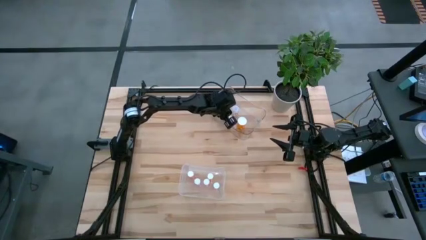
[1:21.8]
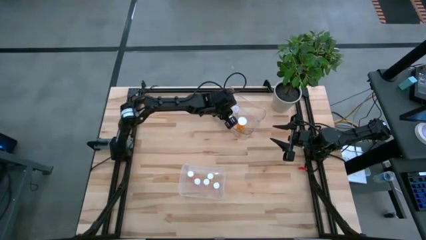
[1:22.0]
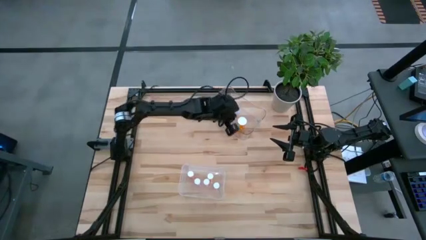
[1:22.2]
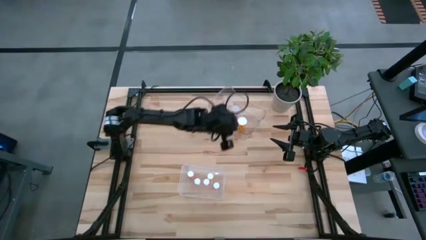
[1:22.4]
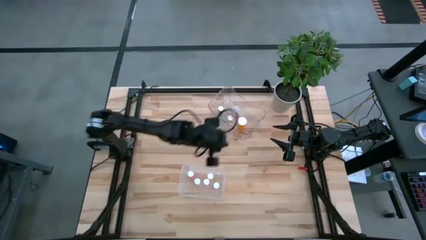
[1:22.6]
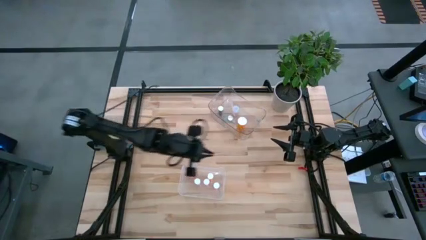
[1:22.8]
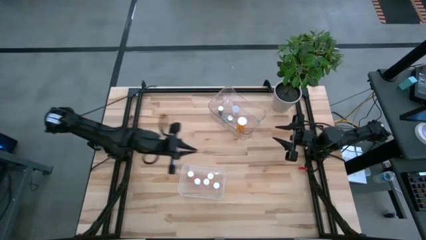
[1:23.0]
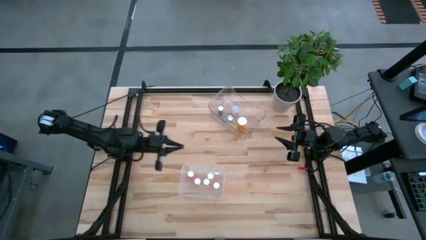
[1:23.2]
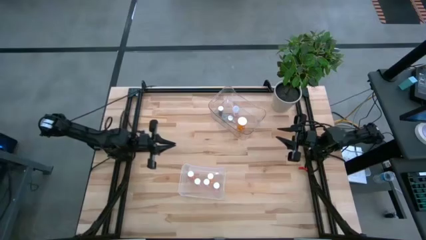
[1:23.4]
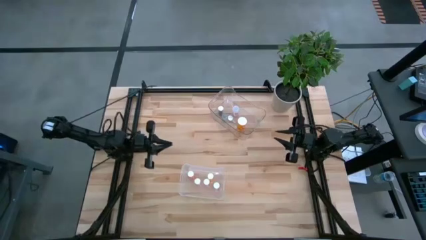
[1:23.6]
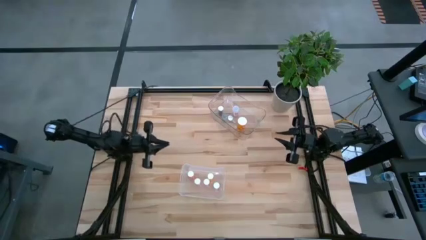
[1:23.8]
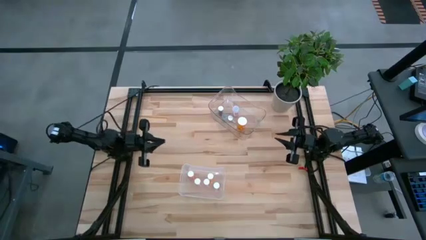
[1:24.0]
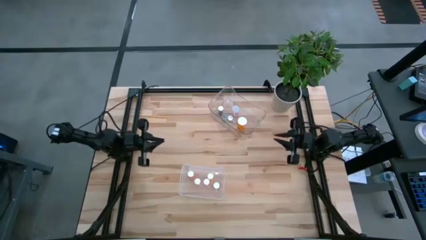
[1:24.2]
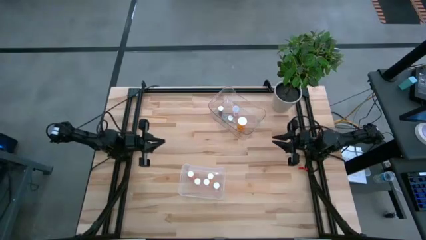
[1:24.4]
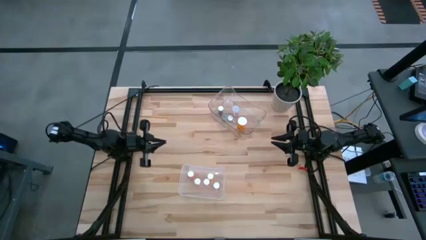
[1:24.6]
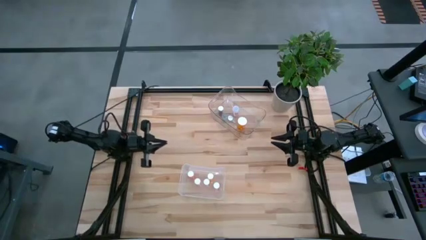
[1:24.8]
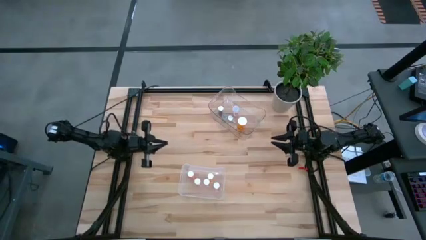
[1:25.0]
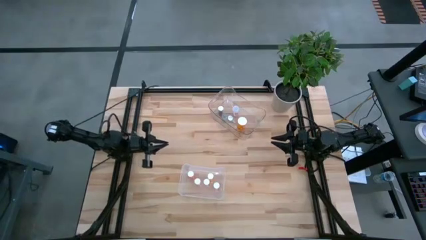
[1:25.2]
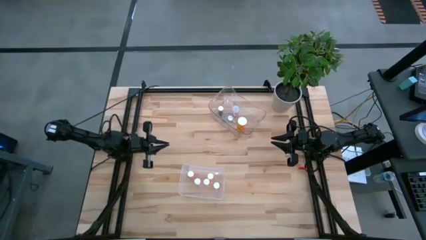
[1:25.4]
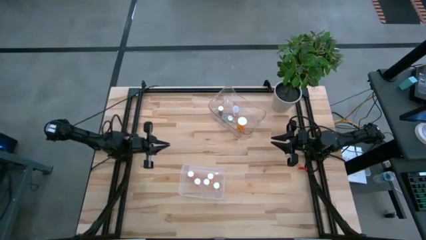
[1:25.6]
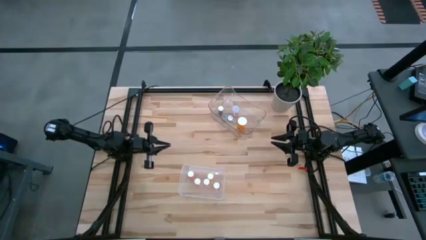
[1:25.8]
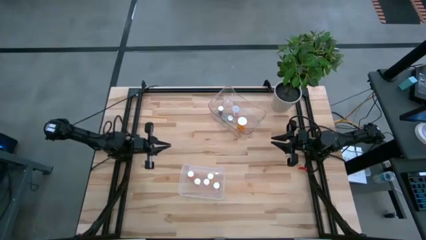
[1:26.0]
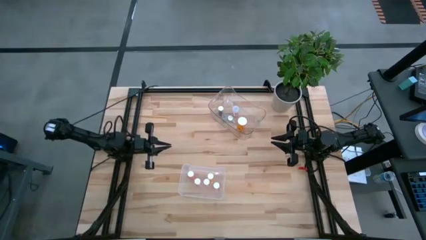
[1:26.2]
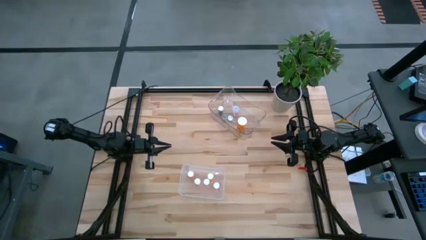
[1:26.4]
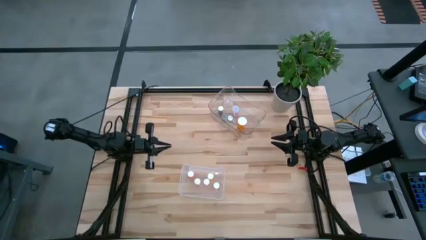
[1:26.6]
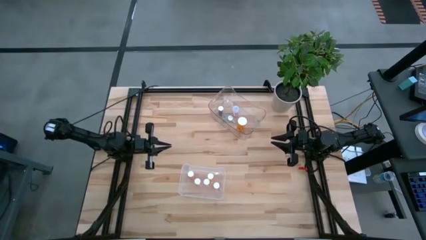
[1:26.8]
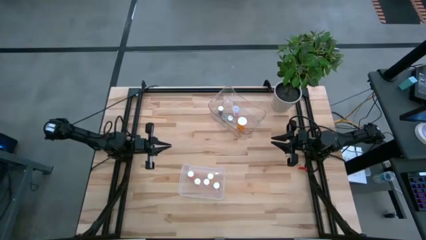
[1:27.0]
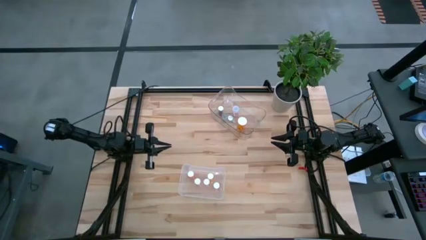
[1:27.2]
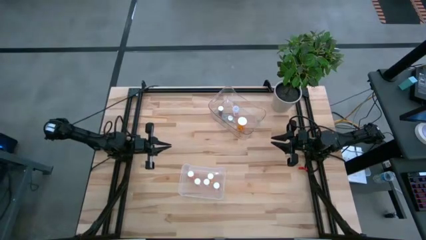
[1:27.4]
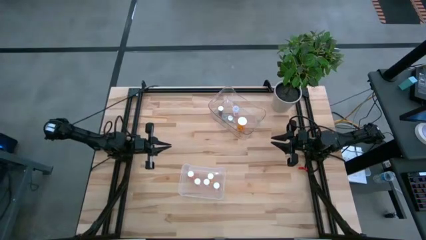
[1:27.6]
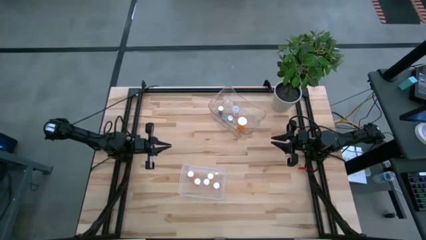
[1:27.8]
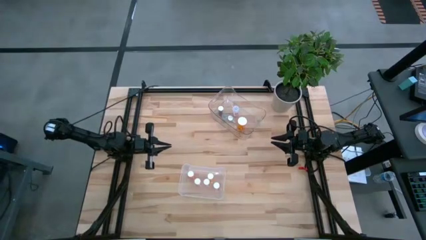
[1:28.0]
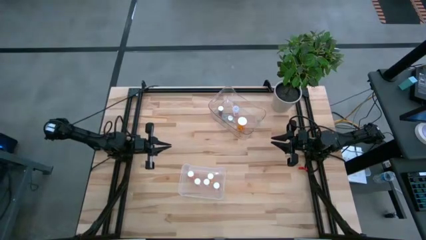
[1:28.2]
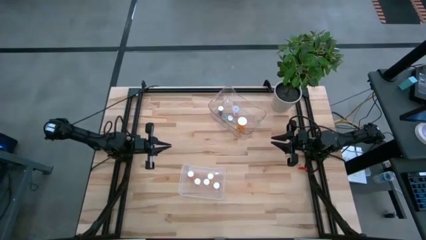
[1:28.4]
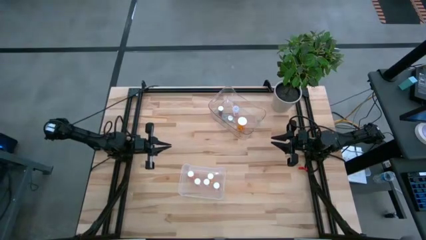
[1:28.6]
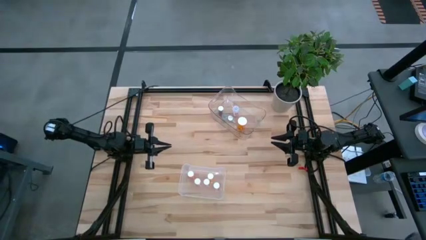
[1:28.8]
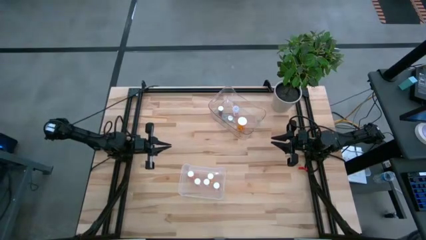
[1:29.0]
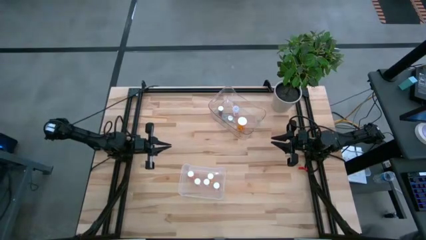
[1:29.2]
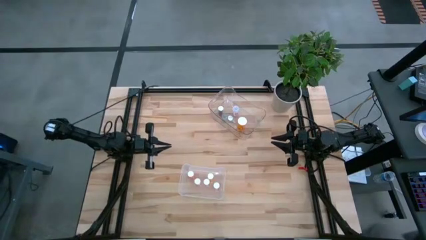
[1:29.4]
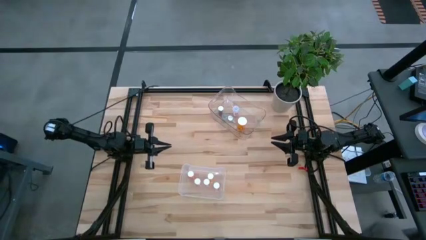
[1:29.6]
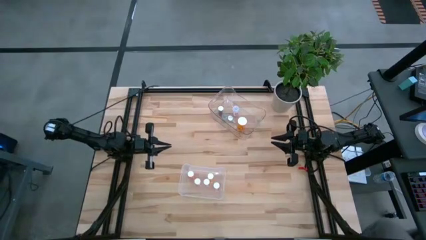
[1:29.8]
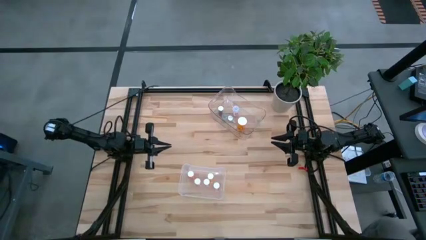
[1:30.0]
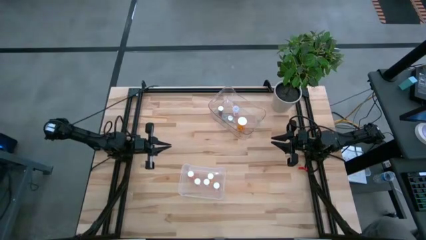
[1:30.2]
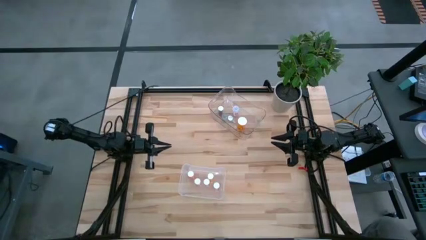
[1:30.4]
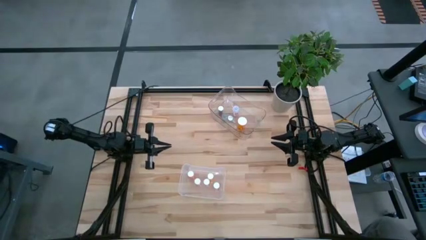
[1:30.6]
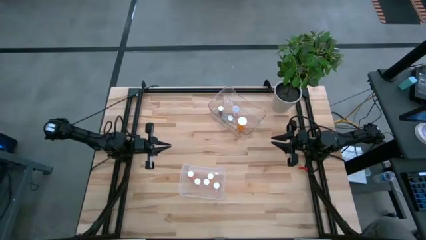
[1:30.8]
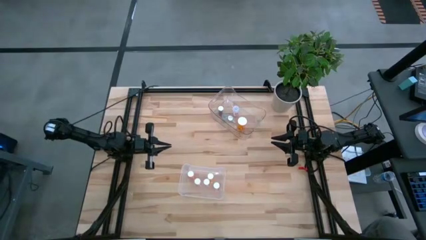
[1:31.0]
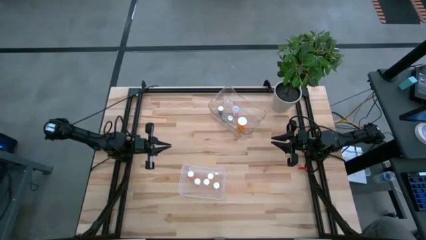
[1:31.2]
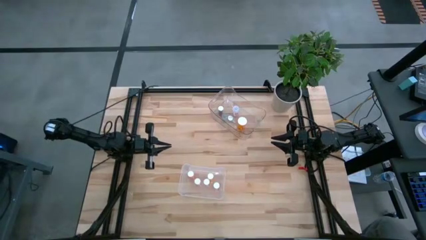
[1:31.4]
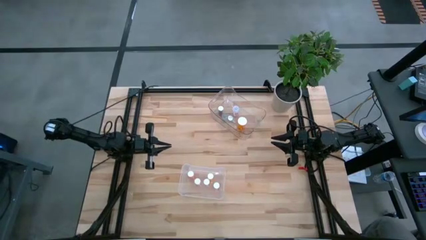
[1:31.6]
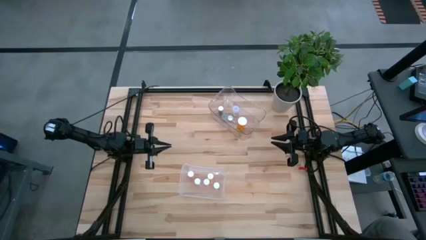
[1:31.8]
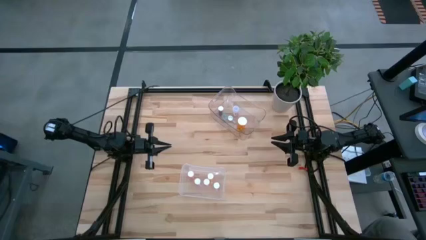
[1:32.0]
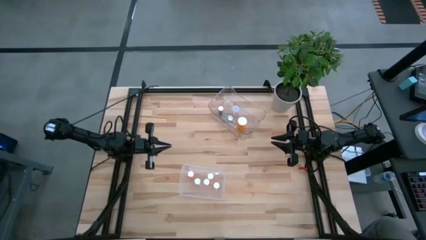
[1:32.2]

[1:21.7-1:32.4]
Task: Pick and place medicine bottles into bin by pill shape (circle, oval)
Return to Home Position

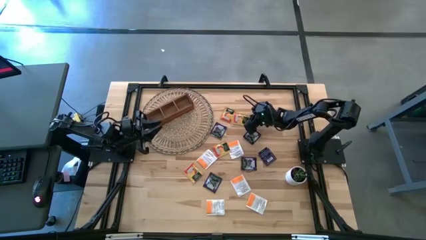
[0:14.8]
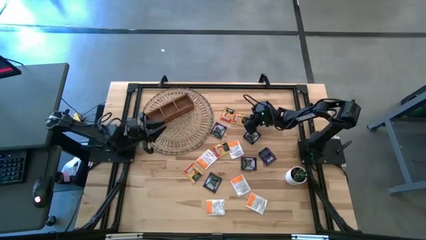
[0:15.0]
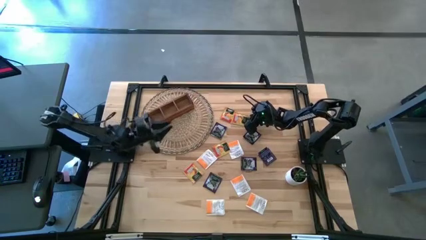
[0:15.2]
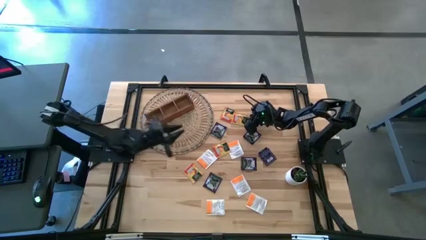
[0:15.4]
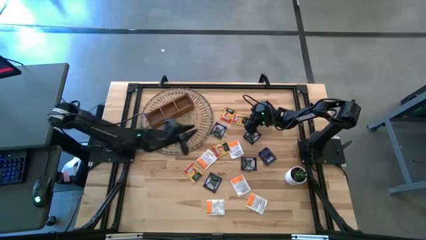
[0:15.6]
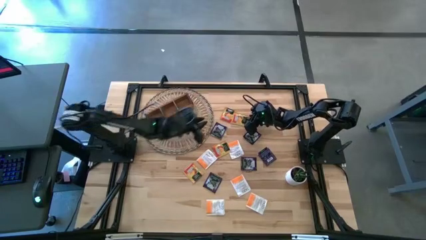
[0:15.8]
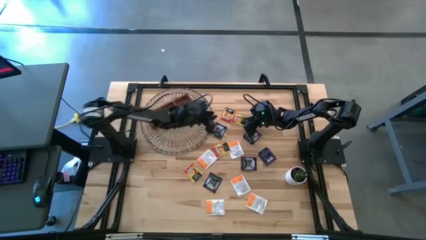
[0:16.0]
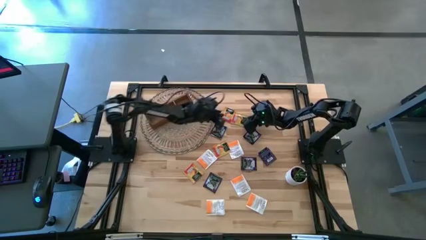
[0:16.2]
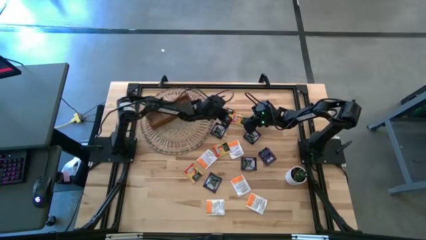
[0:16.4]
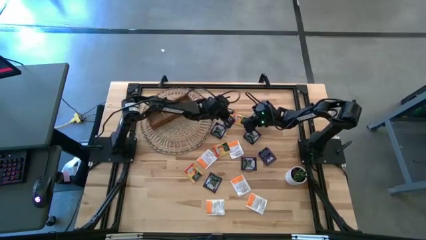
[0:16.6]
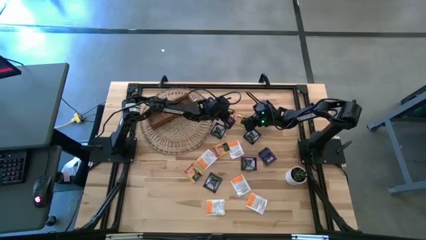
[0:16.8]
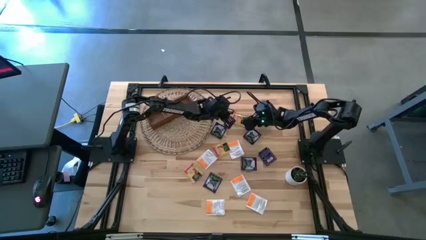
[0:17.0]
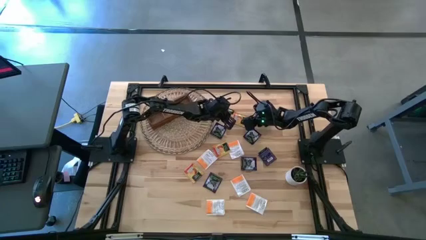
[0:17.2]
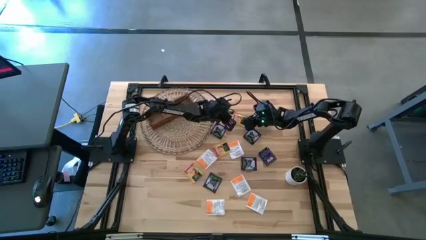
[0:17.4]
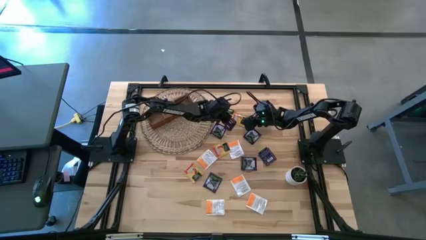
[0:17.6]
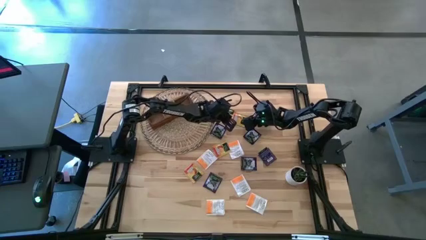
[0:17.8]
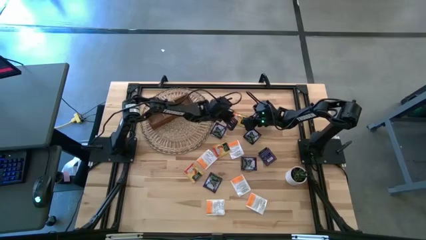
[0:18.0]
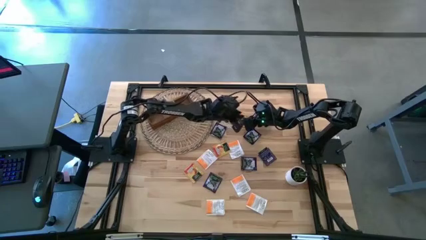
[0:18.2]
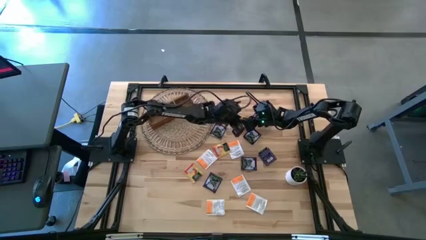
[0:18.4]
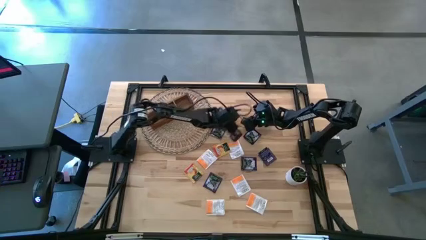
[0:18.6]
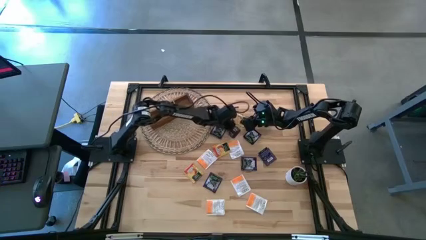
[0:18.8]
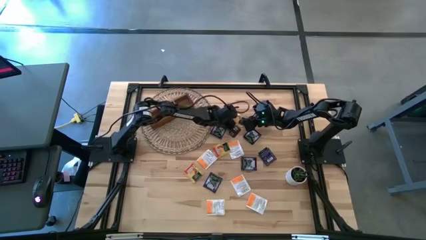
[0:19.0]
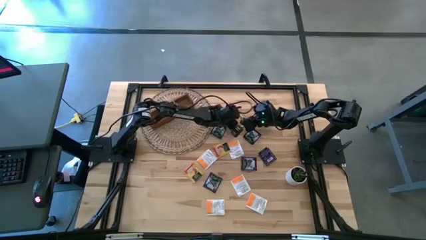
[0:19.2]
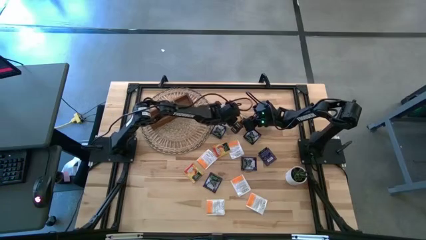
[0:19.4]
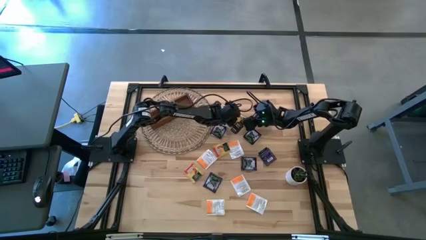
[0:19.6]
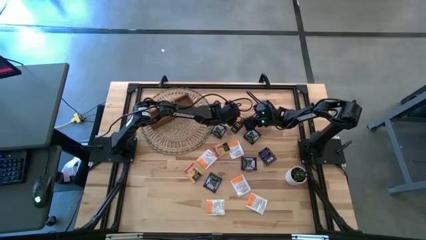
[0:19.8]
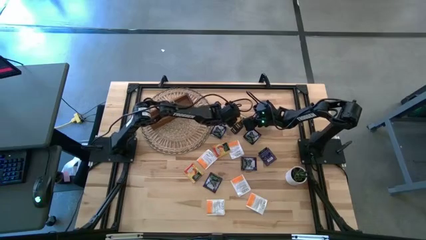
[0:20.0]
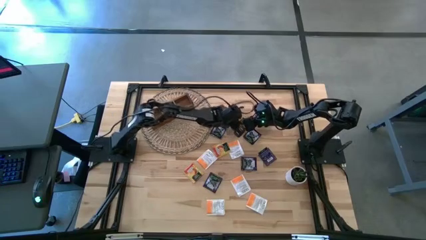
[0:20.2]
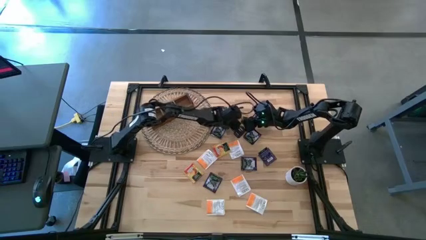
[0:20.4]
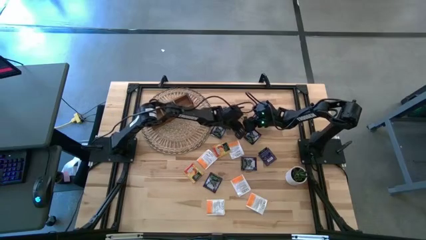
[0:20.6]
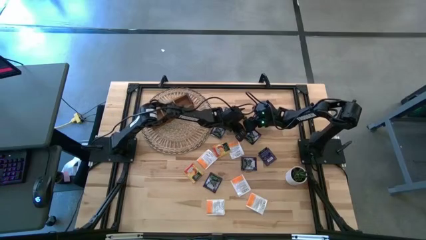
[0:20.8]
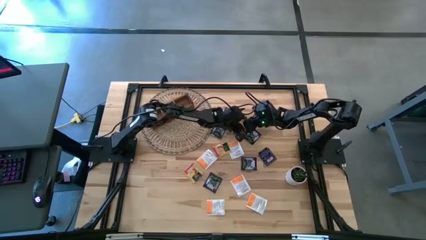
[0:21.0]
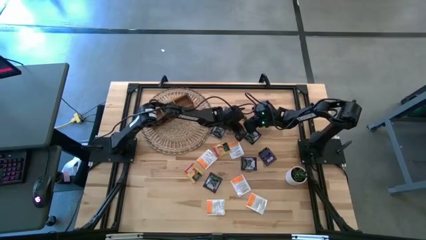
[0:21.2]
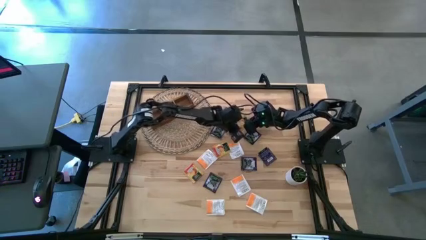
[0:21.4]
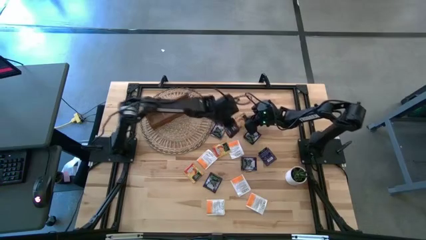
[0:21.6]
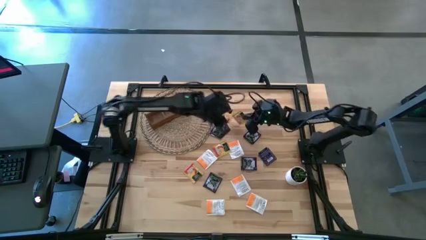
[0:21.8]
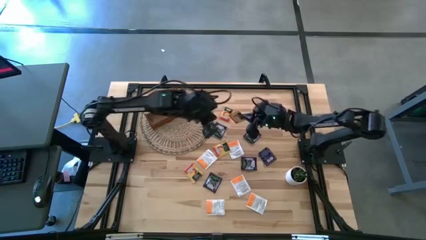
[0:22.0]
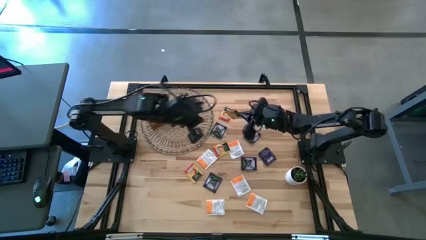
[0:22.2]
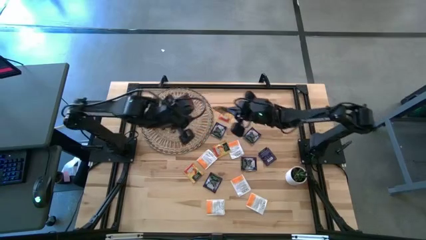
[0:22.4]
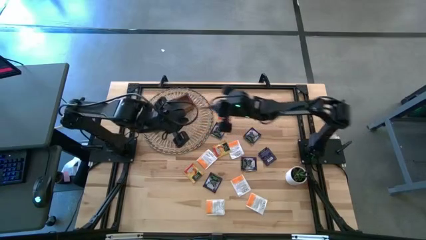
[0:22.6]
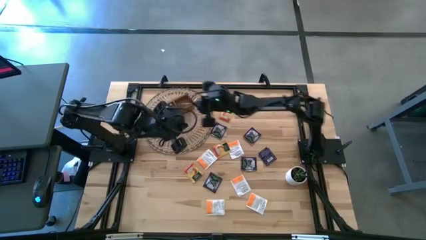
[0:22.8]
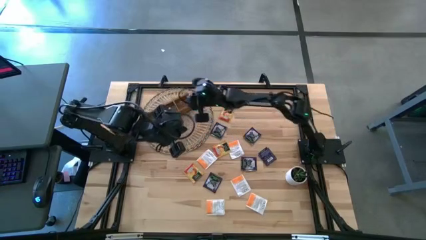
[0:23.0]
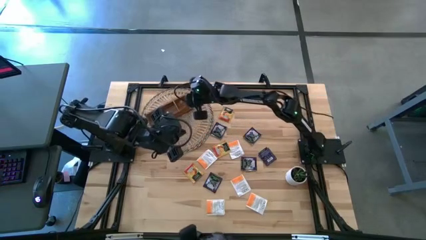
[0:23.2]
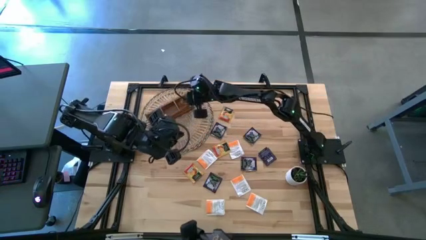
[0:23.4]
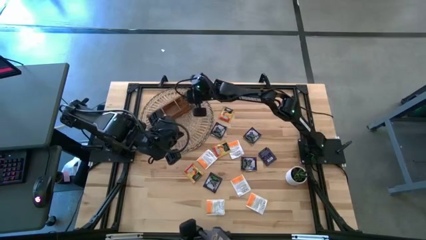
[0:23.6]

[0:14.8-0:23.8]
Task: Pick & Place Tea
Put the yellow tea bag into the right section of the wooden organizer
